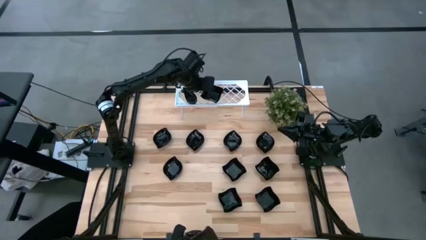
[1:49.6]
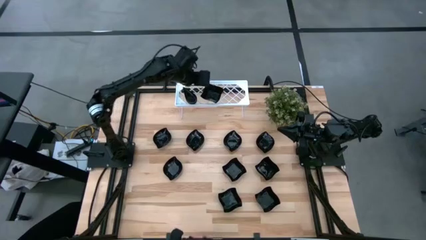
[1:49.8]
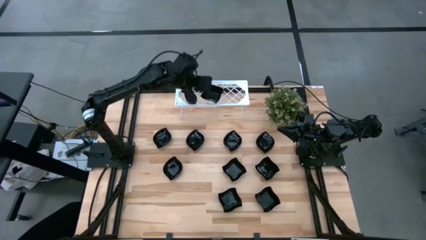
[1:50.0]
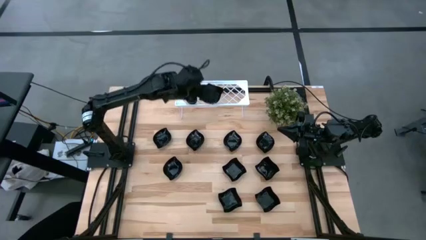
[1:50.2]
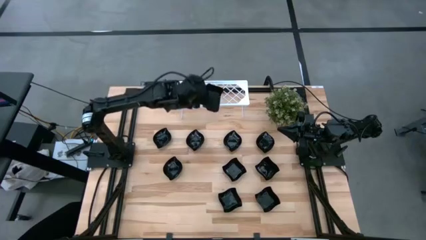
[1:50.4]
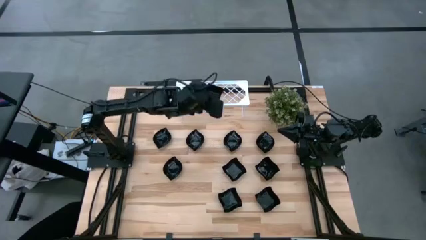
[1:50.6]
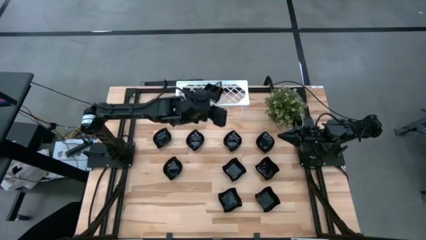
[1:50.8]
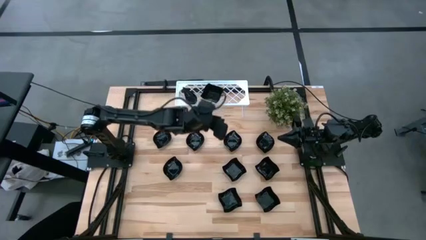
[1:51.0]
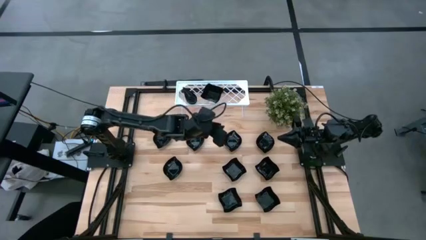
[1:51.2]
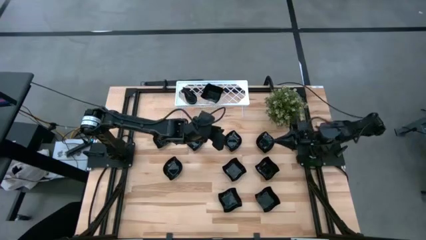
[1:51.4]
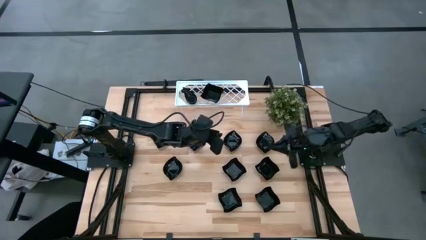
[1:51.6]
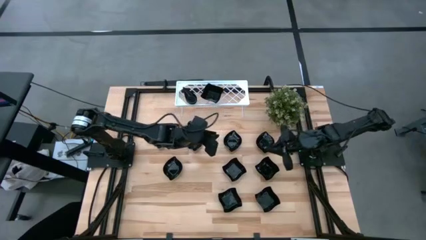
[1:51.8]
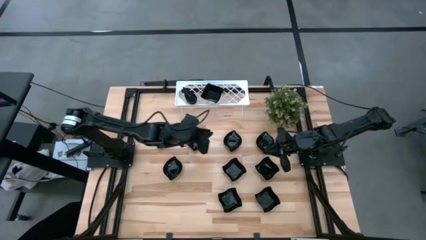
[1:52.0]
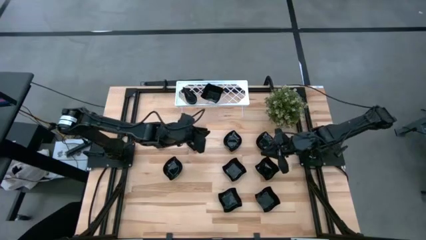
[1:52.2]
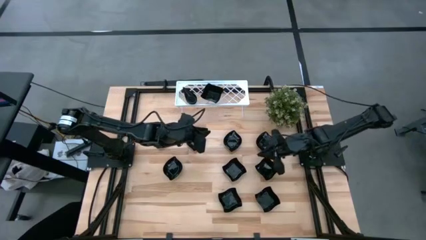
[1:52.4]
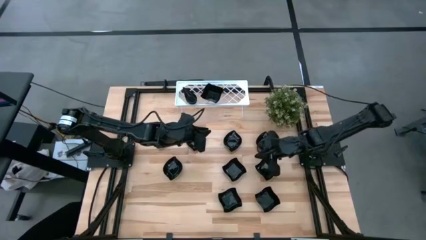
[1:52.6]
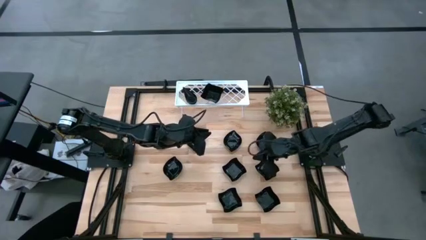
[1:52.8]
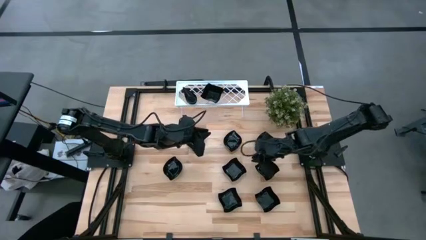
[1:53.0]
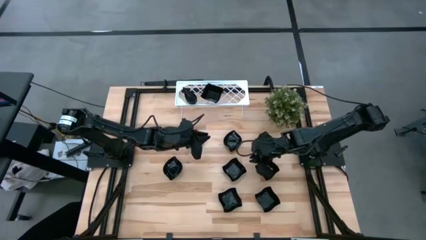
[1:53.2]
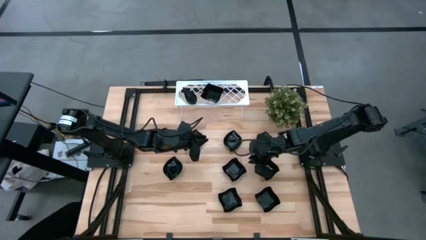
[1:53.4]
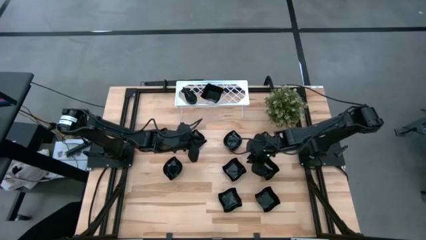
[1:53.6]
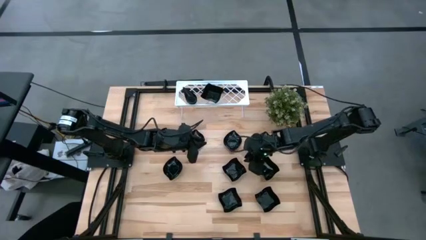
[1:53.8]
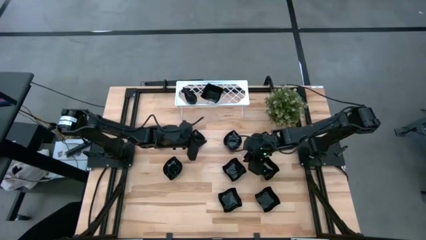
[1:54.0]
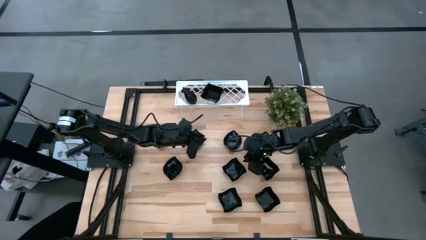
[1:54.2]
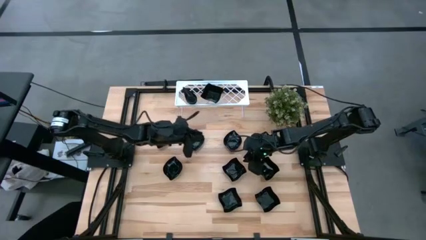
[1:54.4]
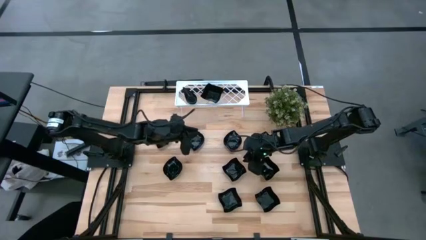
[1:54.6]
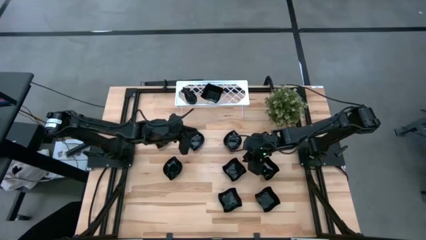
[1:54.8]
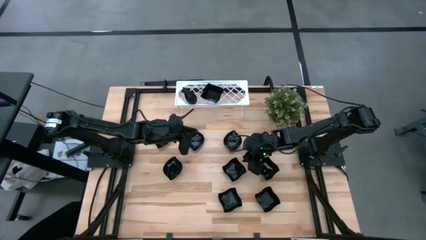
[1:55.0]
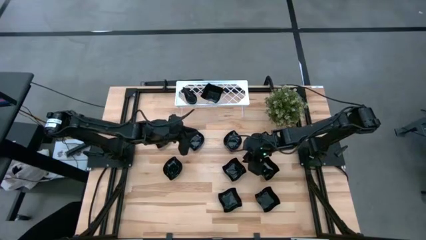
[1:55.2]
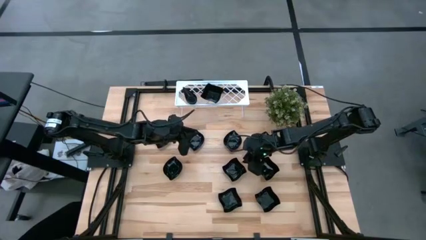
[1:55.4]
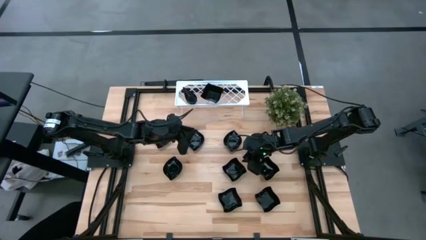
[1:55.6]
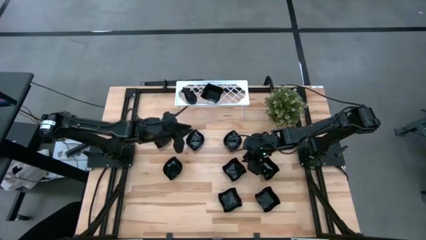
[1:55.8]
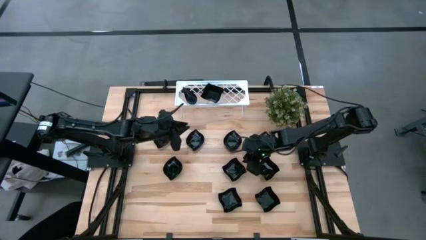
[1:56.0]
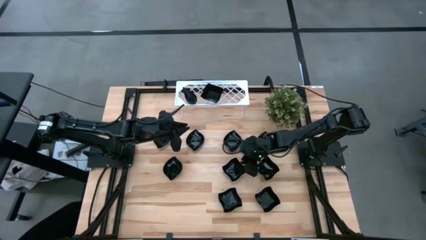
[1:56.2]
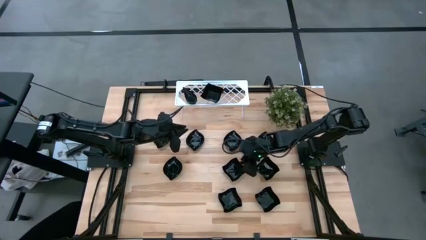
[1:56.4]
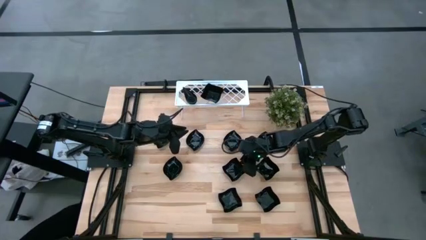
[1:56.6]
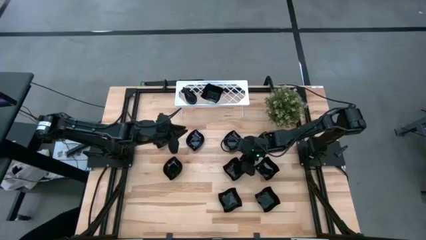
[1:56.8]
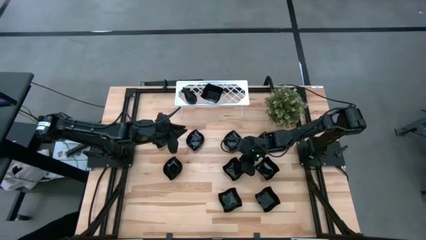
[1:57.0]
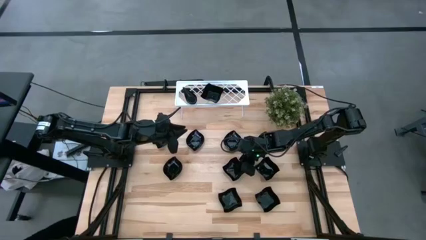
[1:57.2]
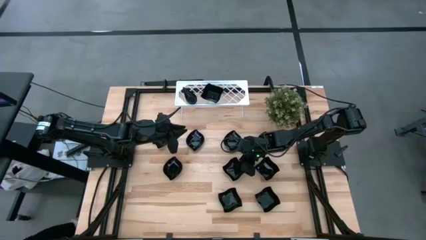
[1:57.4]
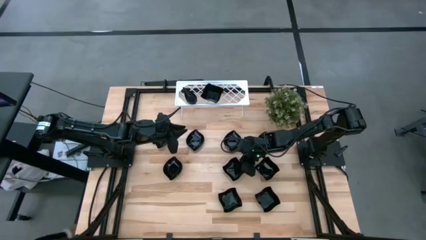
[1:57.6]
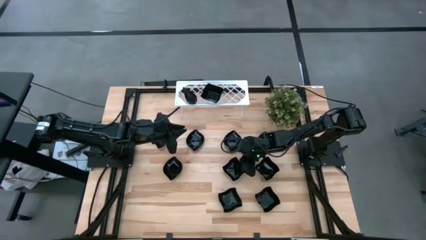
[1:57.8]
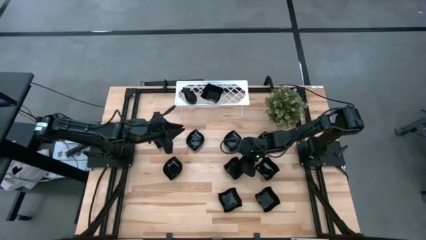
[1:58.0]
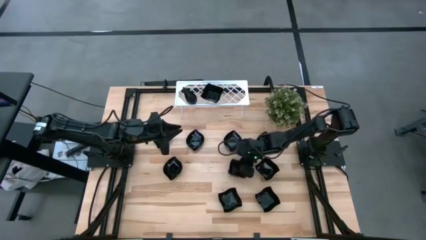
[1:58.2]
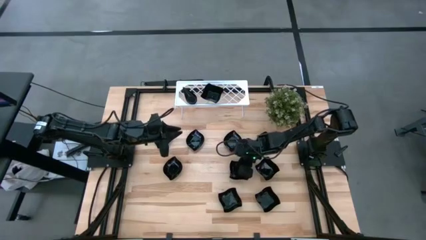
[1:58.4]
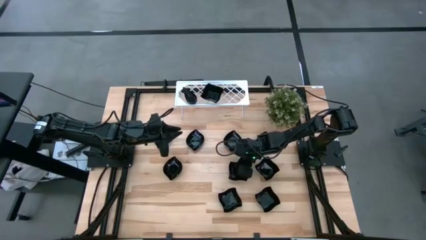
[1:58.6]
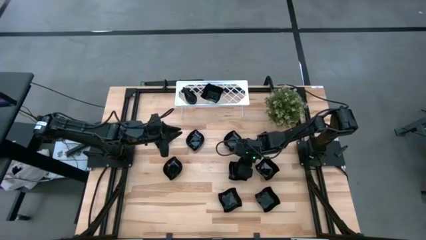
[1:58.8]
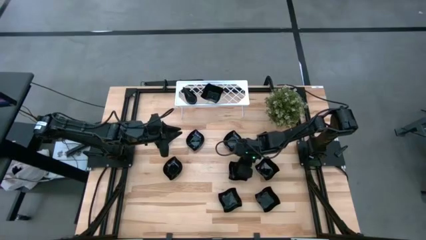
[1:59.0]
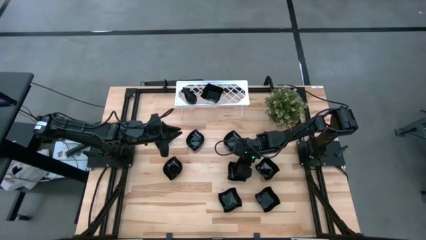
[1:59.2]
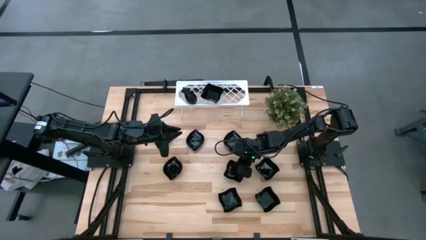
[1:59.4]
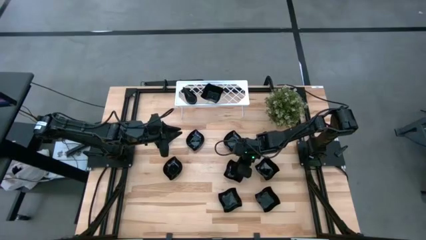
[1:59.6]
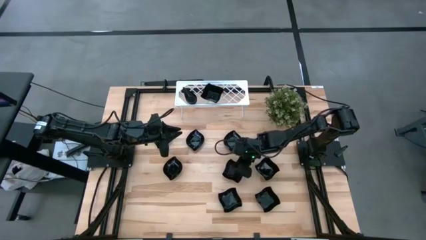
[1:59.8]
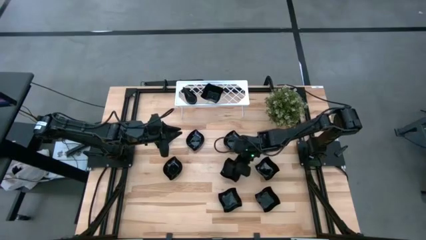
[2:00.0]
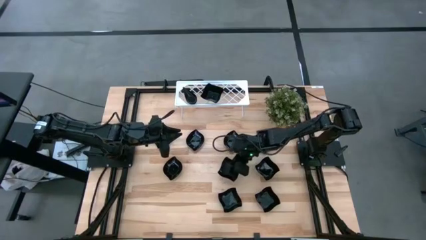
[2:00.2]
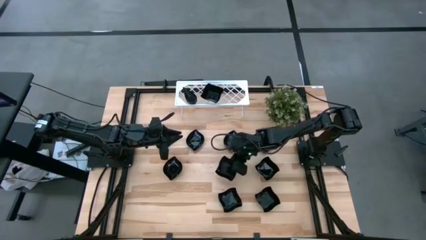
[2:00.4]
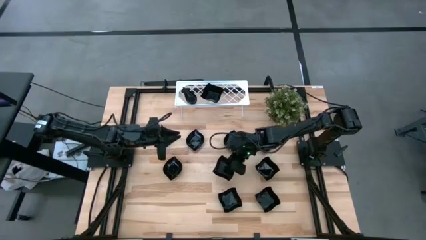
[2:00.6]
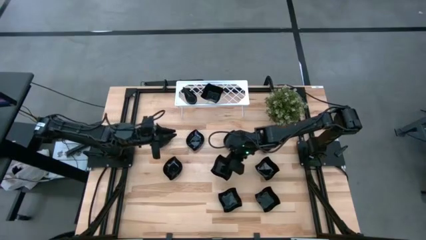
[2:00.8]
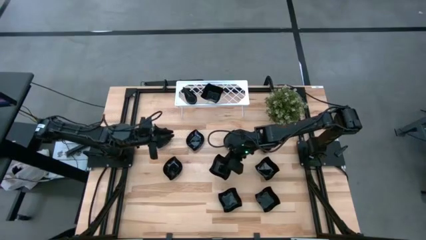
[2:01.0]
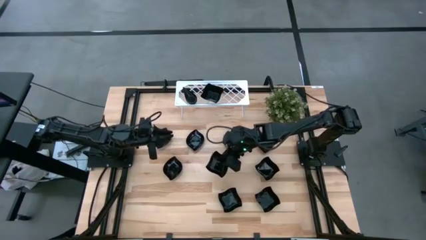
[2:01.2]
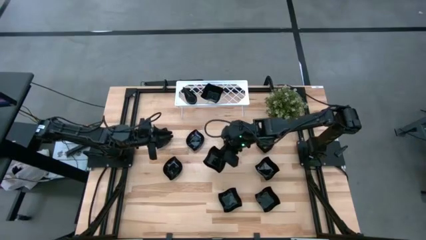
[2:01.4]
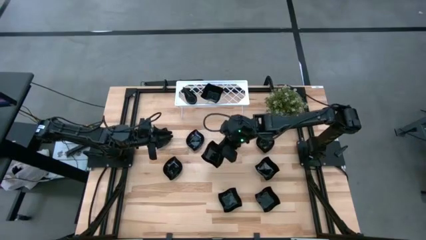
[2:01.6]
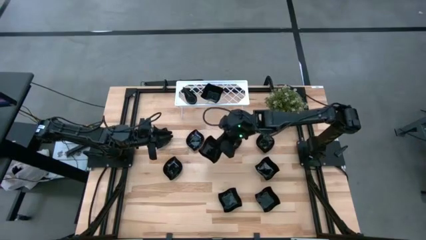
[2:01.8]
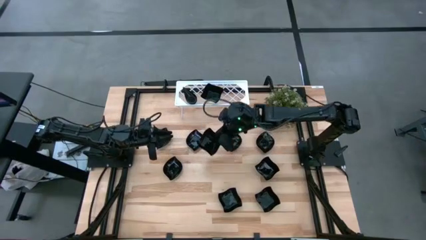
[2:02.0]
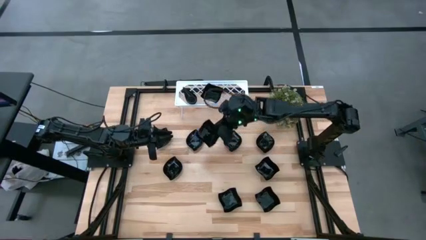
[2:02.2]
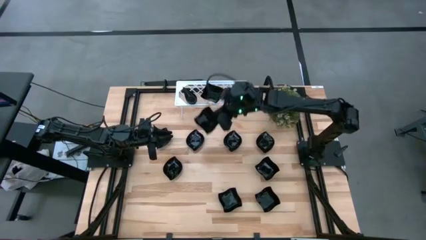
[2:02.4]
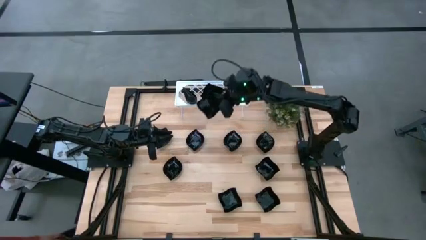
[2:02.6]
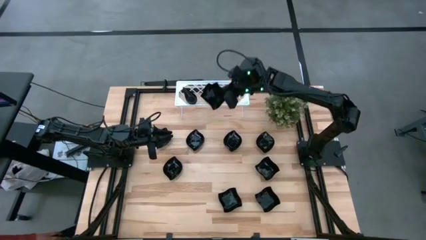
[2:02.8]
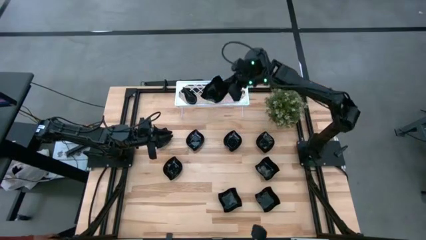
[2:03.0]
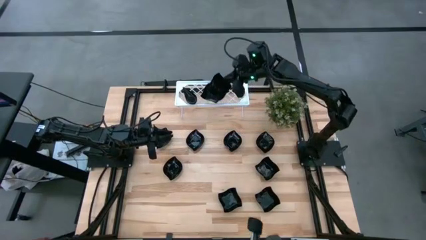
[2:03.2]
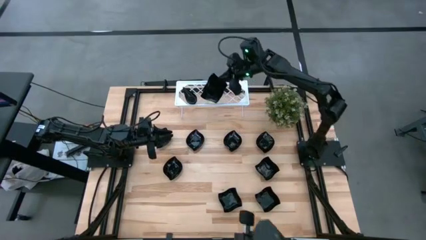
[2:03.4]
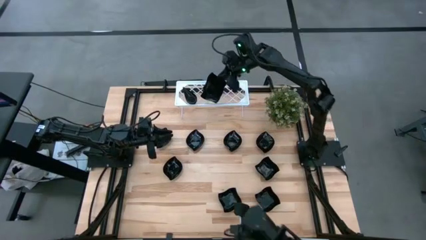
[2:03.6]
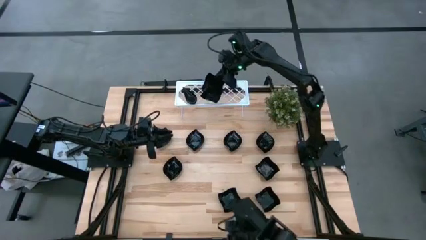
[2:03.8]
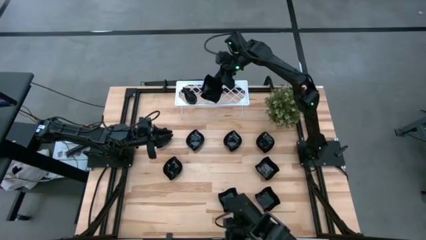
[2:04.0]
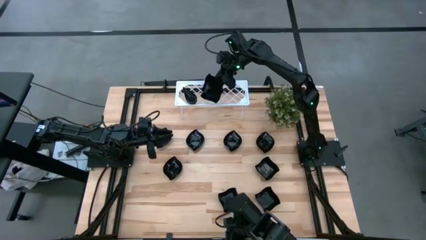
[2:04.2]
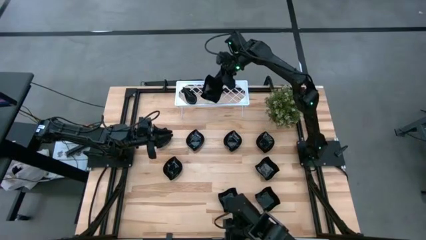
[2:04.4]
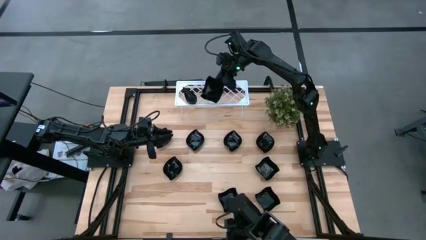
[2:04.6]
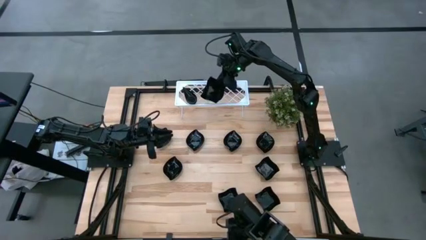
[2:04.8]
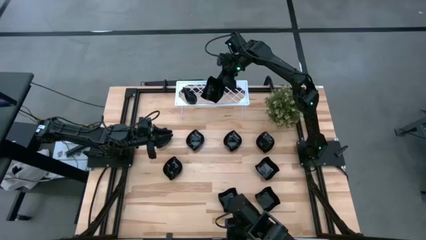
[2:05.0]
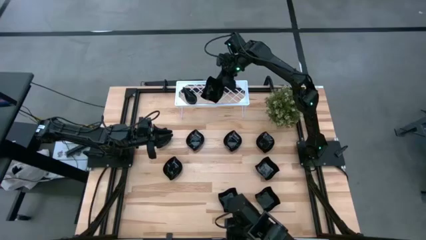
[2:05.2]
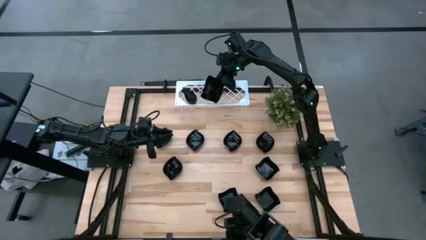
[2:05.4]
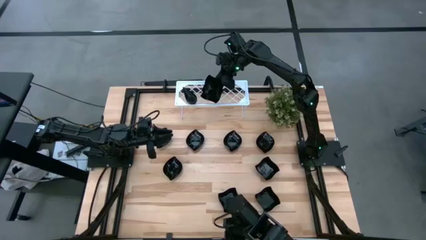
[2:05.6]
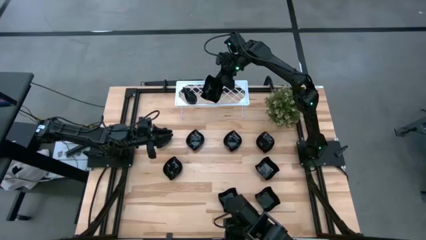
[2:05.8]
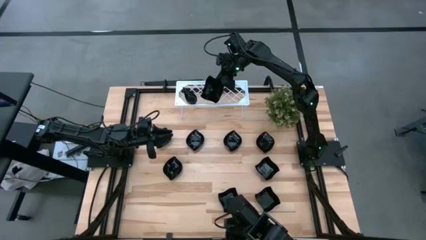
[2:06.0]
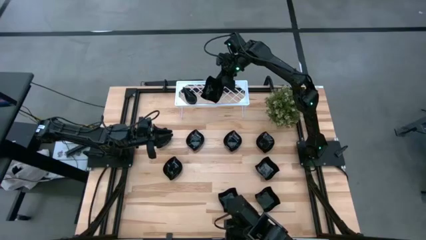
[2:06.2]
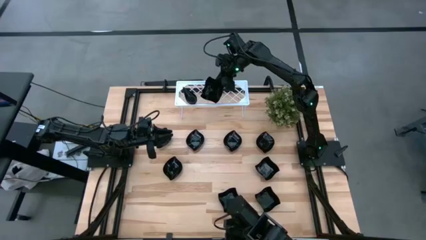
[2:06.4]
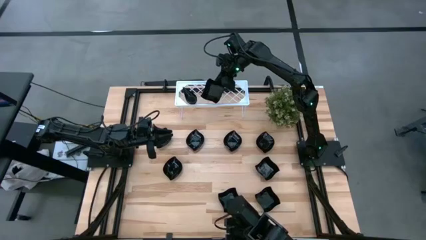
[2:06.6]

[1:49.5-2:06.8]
Task: Pick & Place Mini shaped plates
Stack the black distorted square plate on top of the black distorted square plate on the shelf
